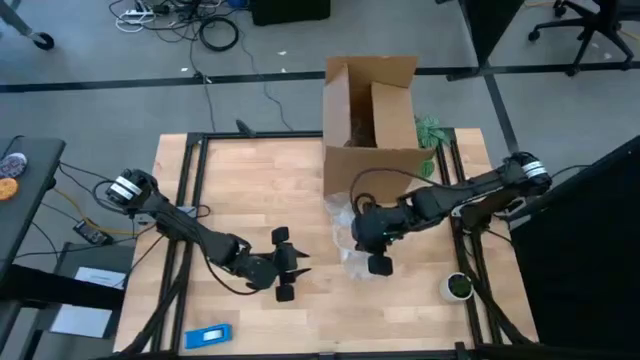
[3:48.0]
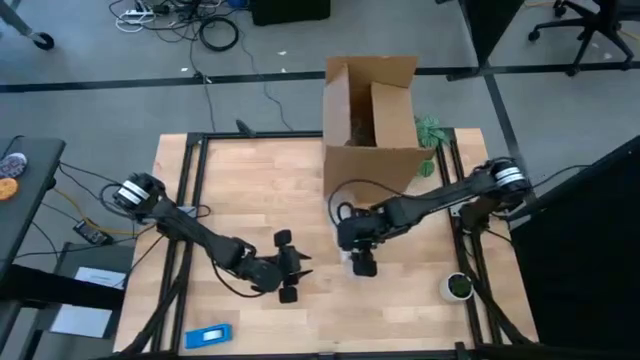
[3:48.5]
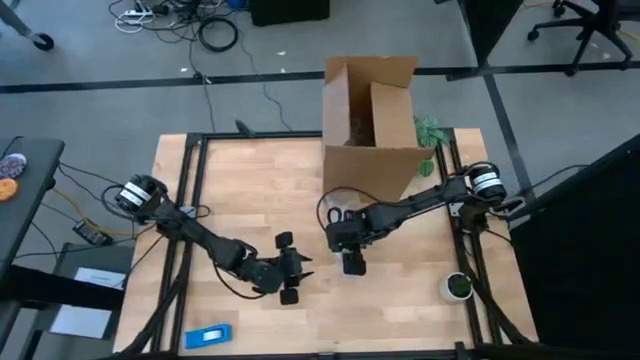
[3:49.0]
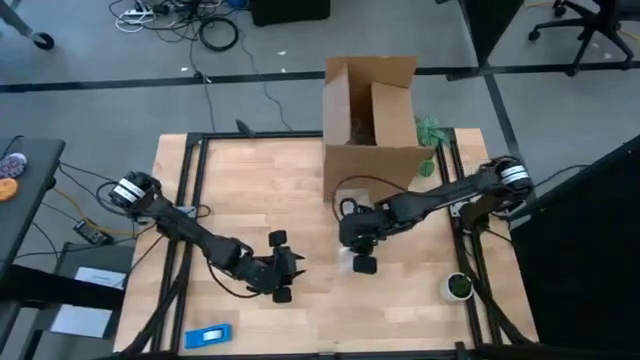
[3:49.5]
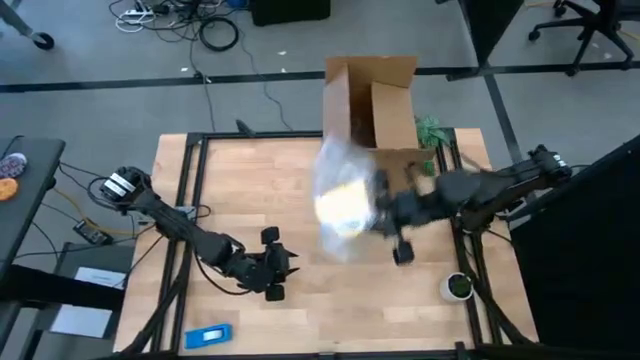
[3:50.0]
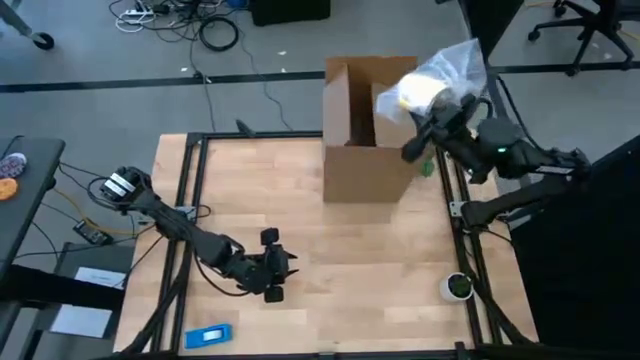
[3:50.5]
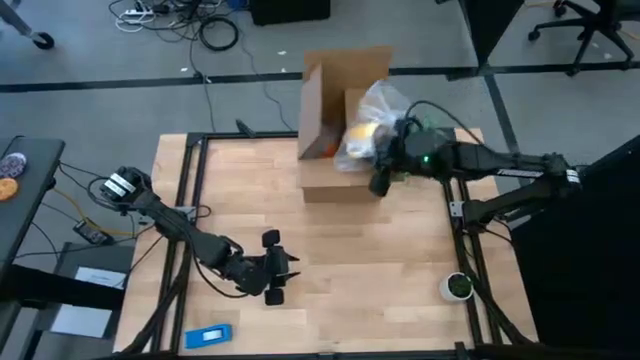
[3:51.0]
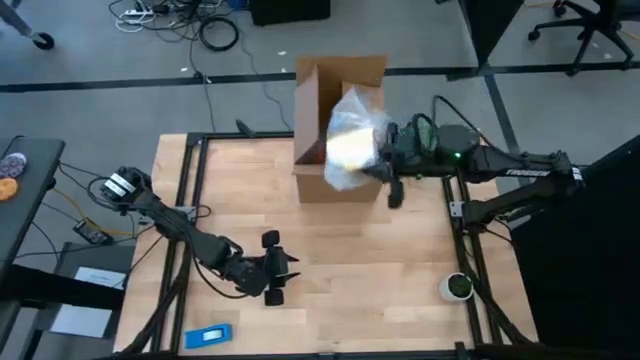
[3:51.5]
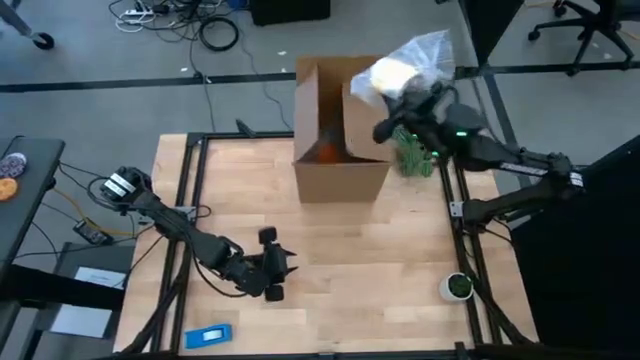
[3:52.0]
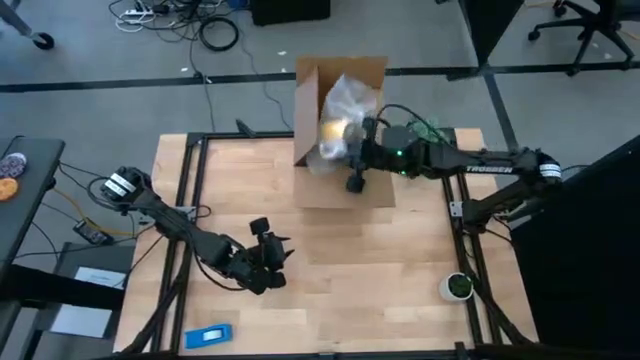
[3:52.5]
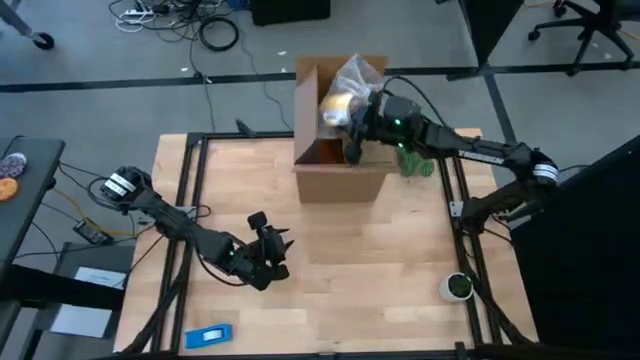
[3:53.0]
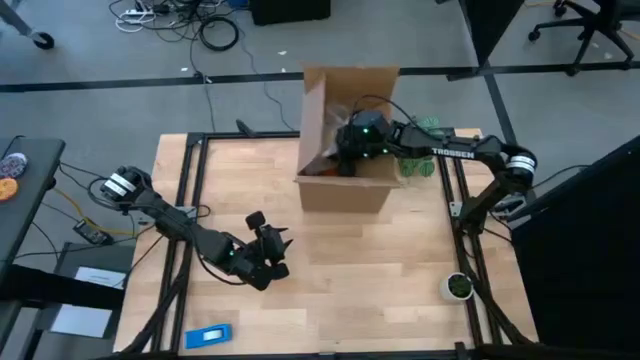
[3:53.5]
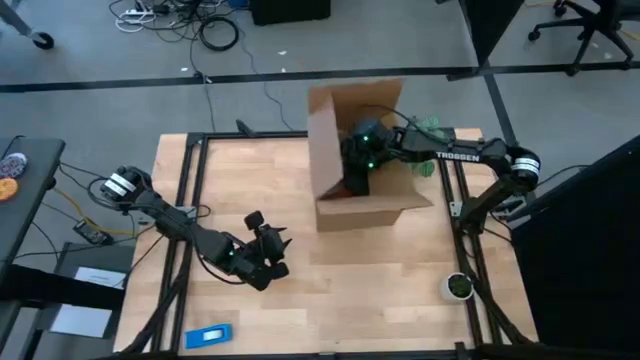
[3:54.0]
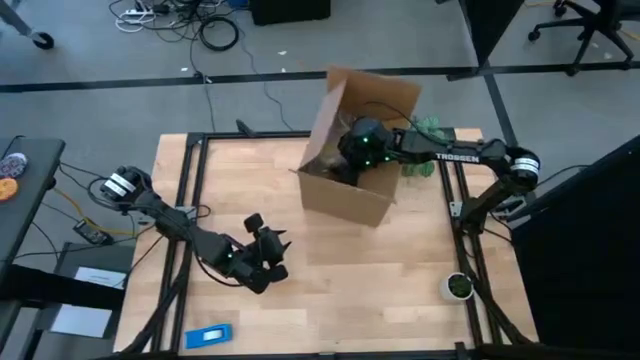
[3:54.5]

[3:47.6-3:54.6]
Task: wrap mug
Put the wrapped yellow mug into the cardboard box

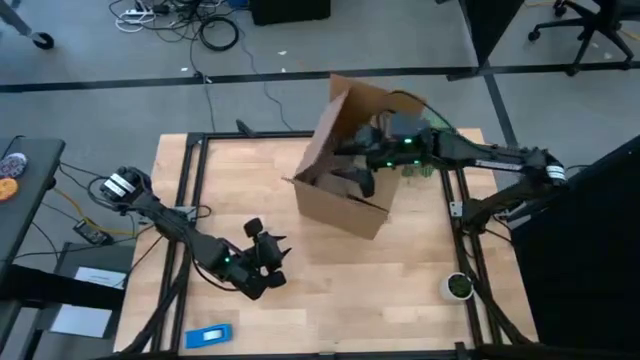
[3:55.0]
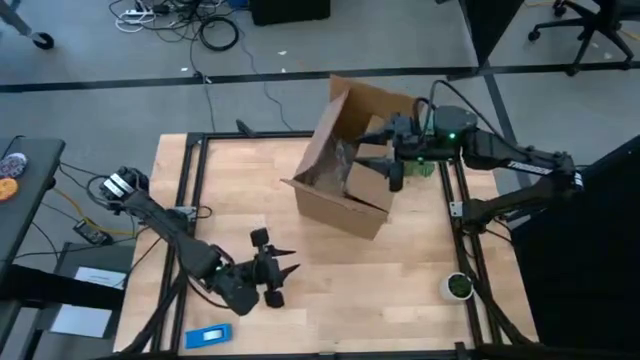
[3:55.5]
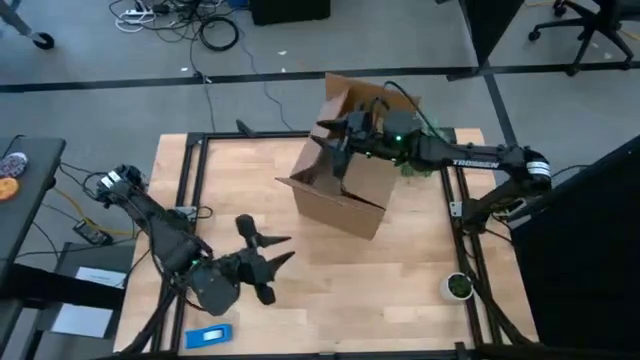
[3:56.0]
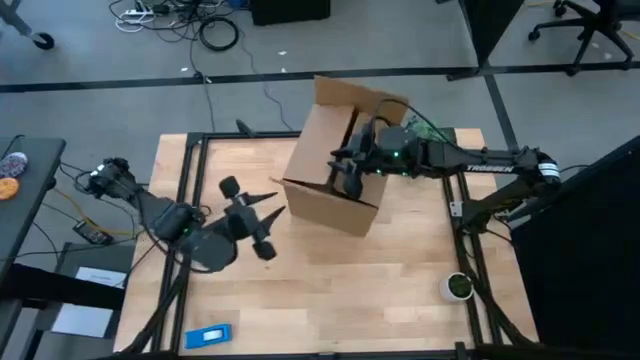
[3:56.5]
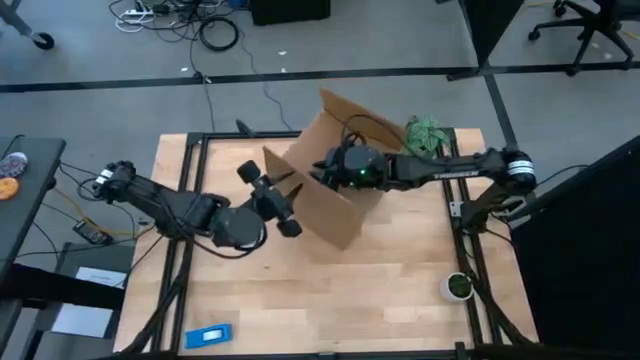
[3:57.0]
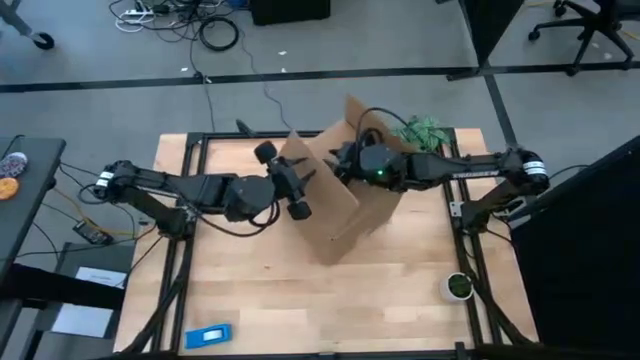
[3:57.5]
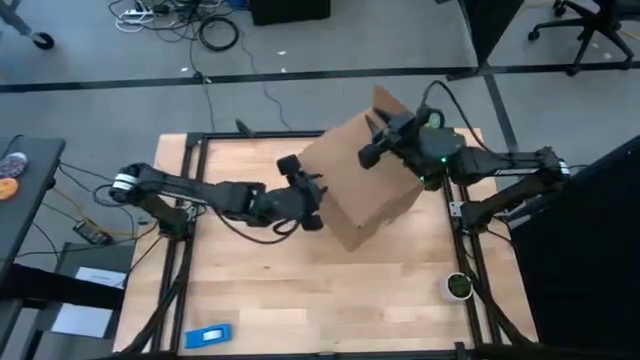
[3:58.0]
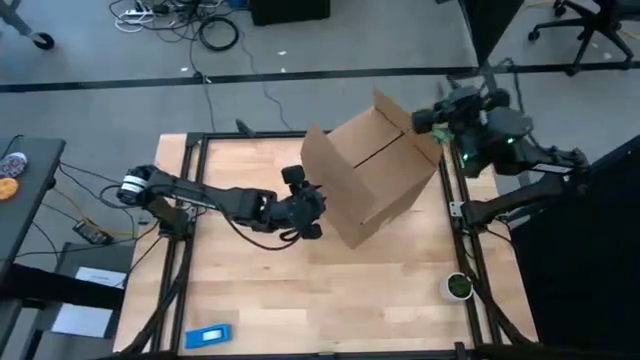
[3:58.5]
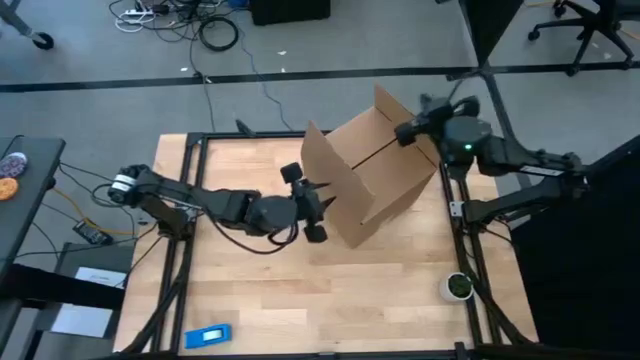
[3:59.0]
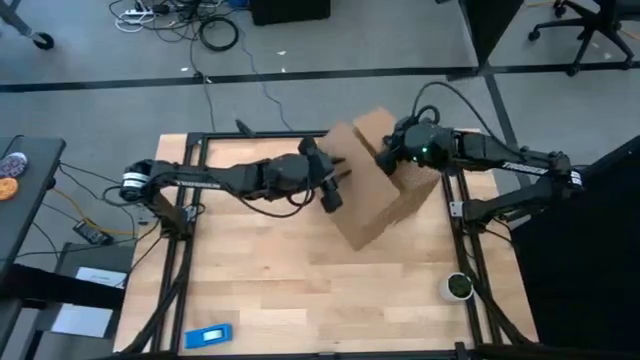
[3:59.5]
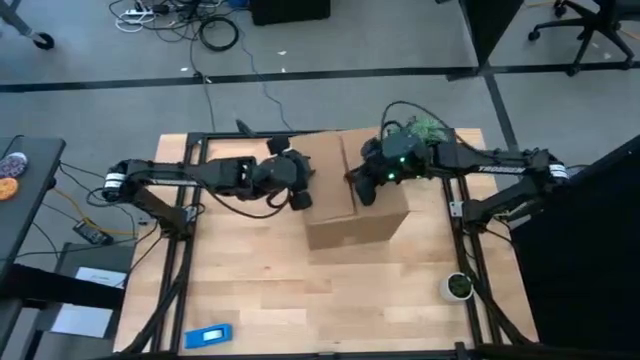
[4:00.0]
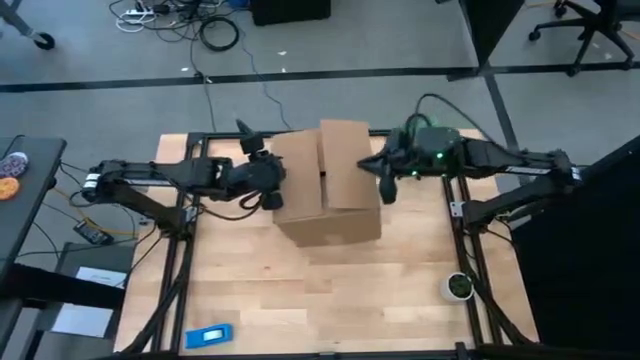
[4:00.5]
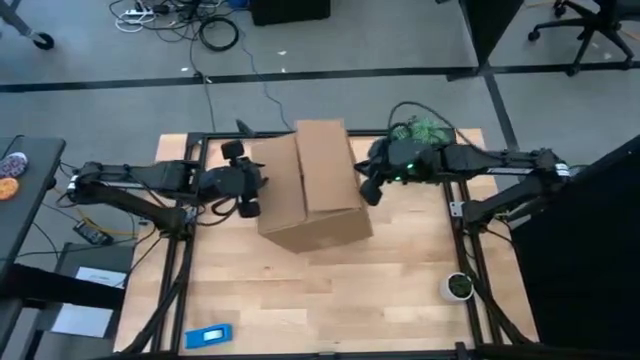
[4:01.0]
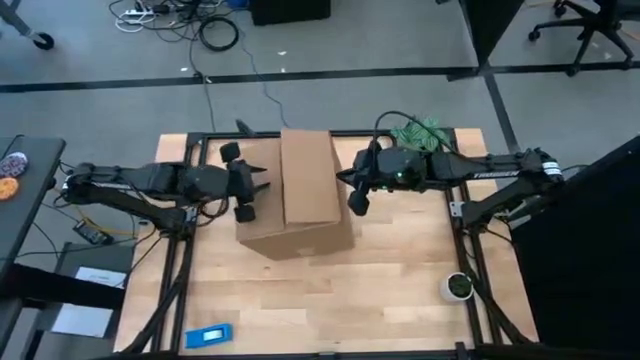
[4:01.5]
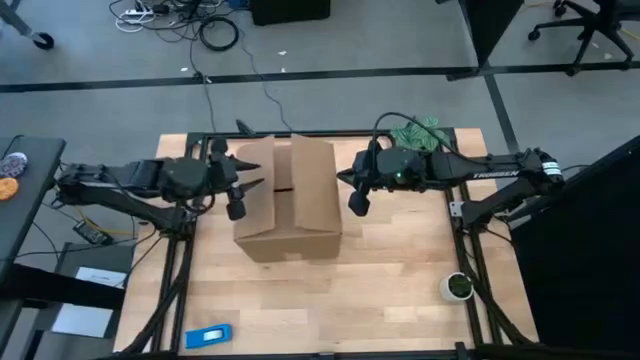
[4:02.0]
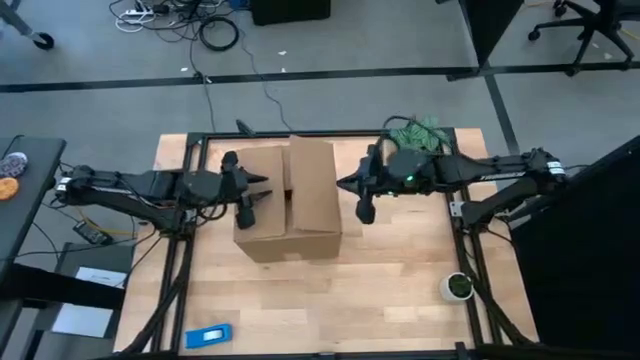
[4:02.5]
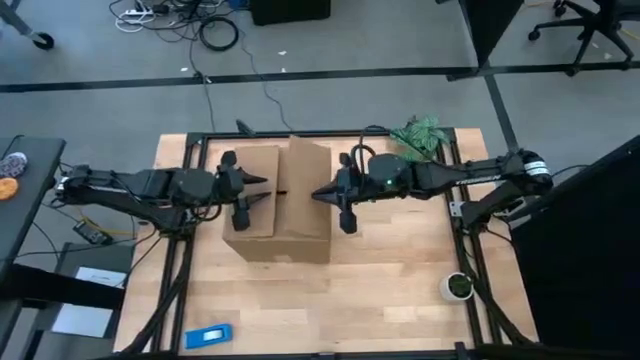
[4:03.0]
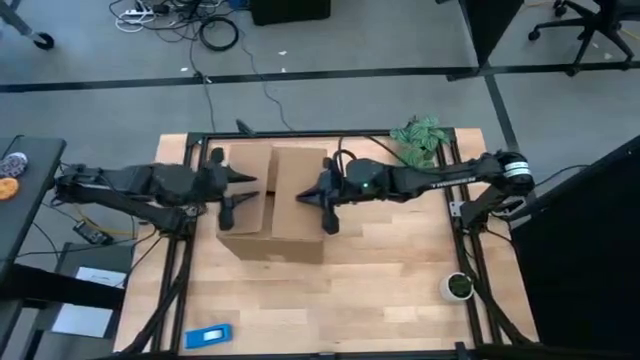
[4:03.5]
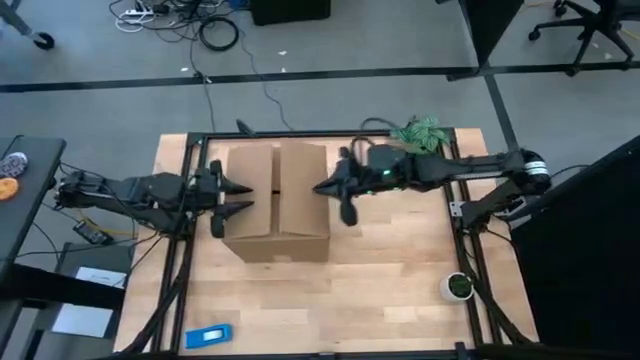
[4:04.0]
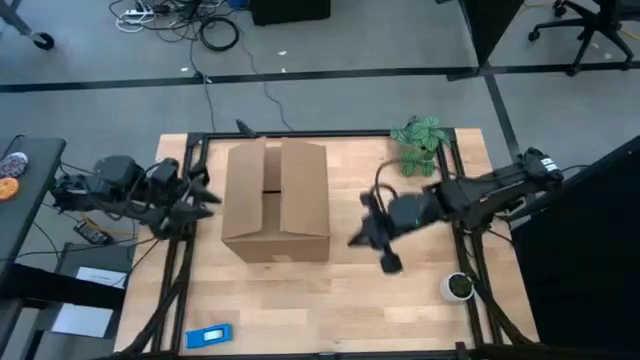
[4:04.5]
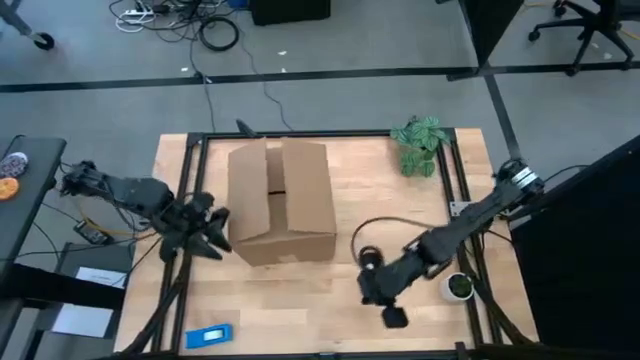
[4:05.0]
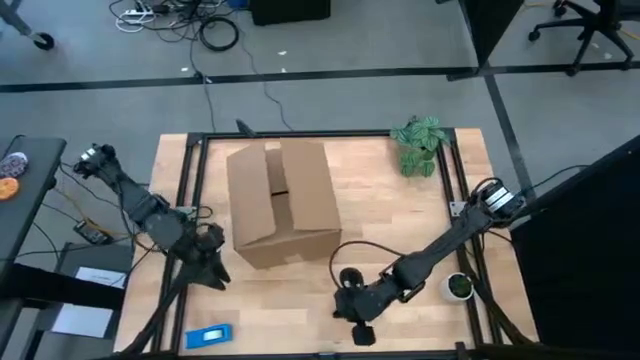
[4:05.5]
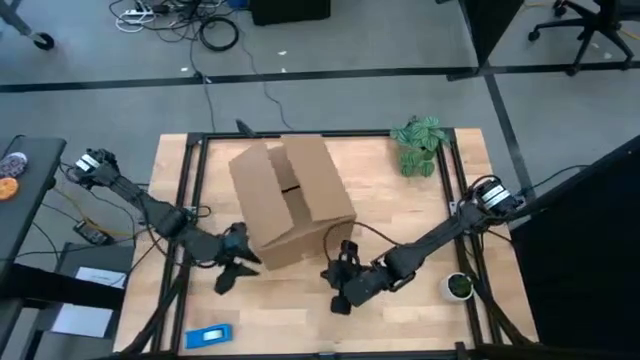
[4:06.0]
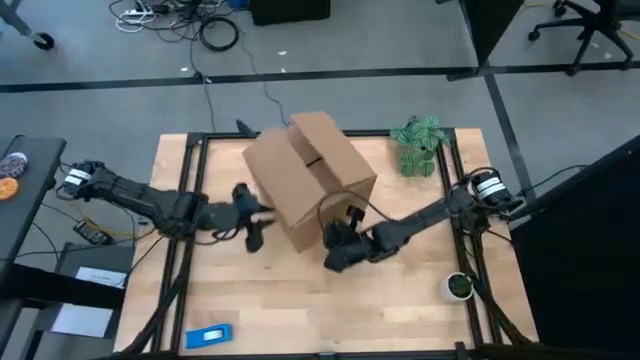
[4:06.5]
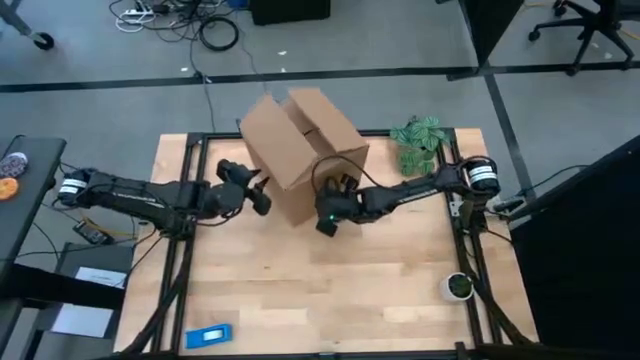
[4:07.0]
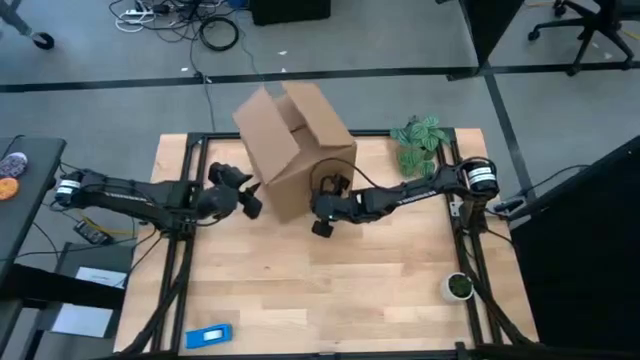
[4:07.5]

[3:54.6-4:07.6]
Close the cardboard box

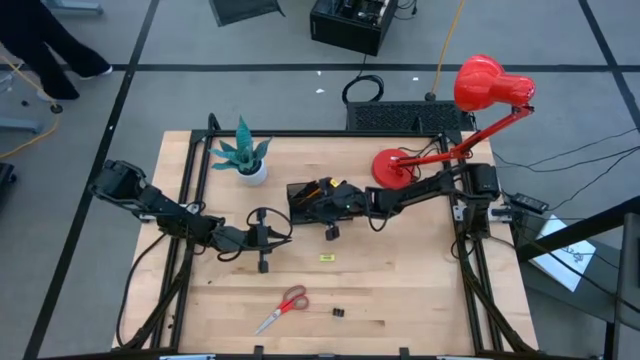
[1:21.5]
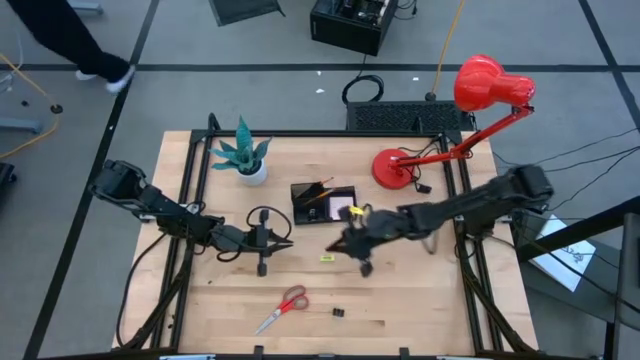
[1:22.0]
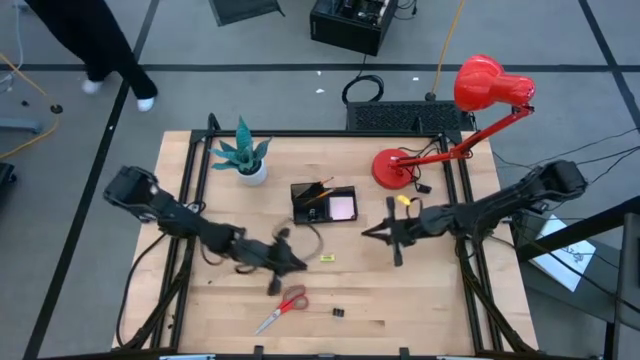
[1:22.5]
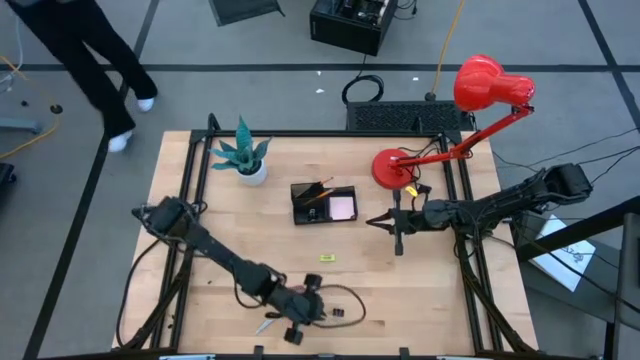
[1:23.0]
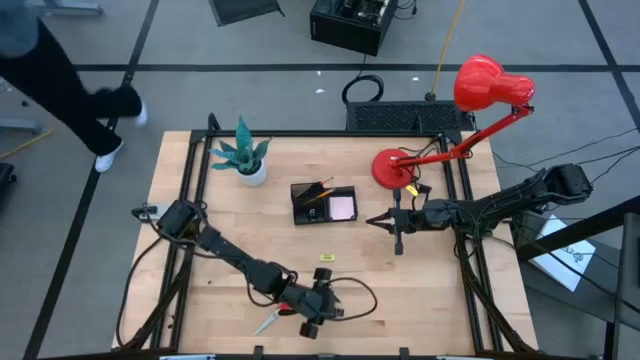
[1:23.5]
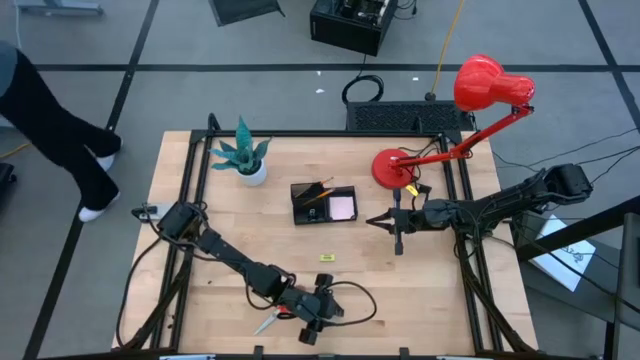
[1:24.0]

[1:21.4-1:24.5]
Task: Pick and place office supplies into organizer
Put the black binder clip into the black desk organizer
